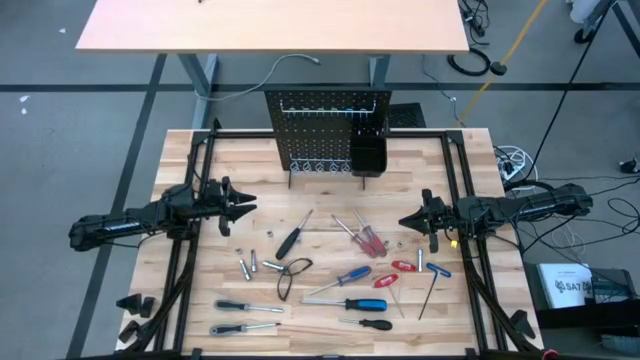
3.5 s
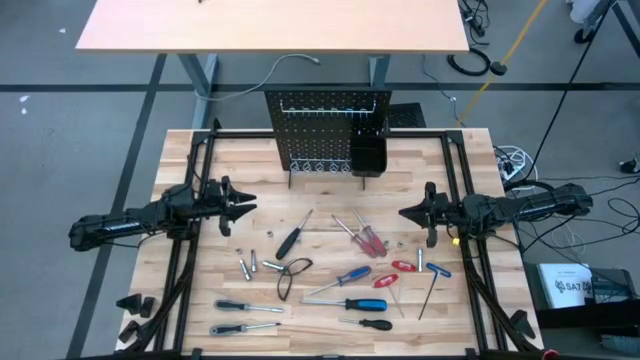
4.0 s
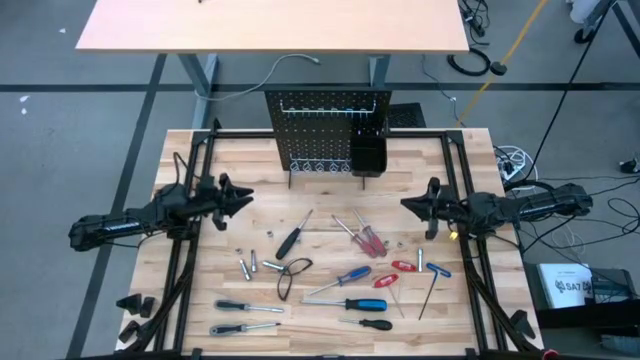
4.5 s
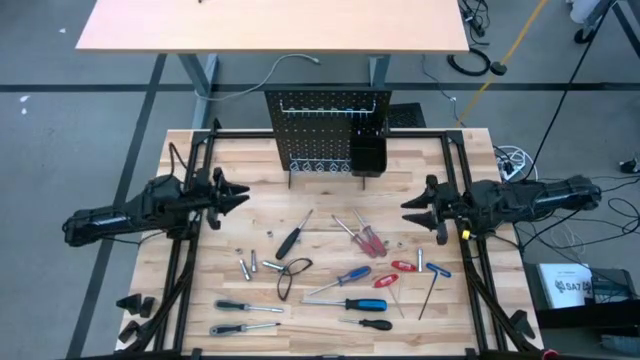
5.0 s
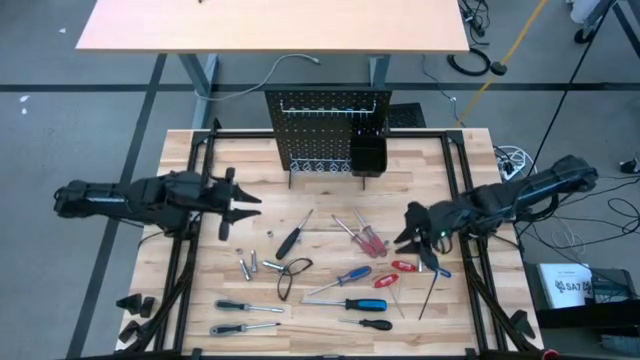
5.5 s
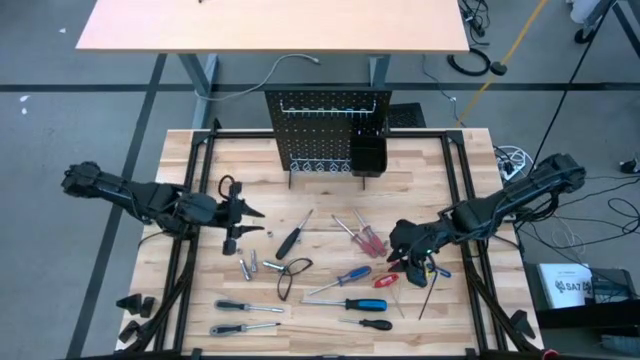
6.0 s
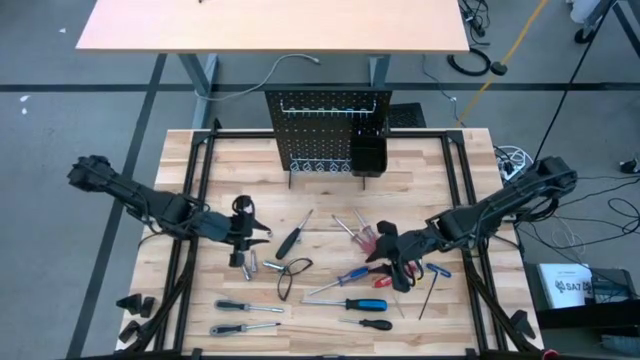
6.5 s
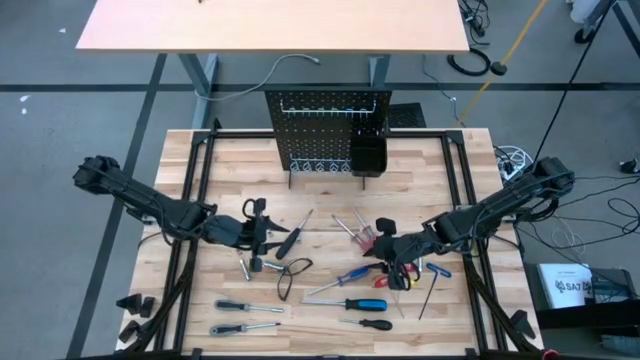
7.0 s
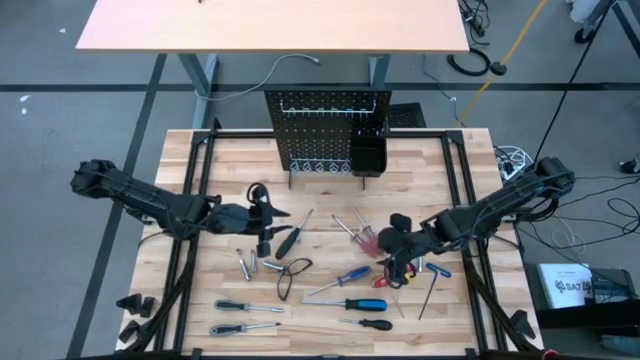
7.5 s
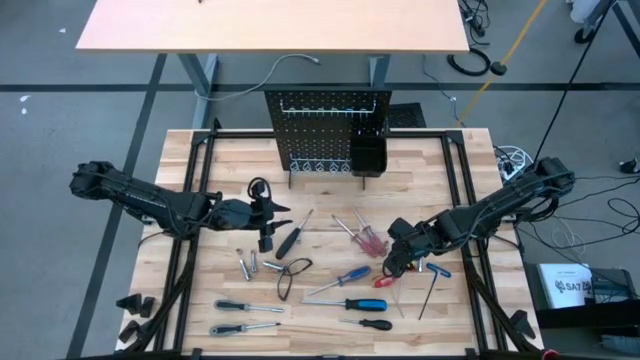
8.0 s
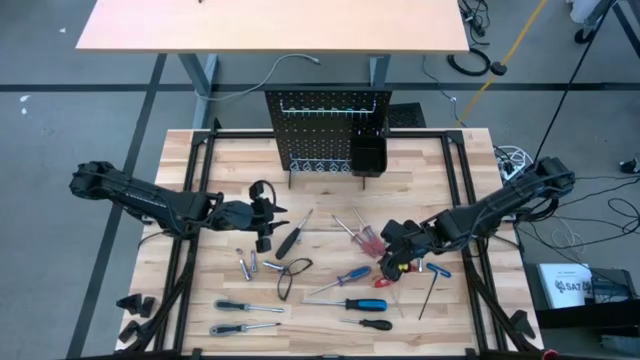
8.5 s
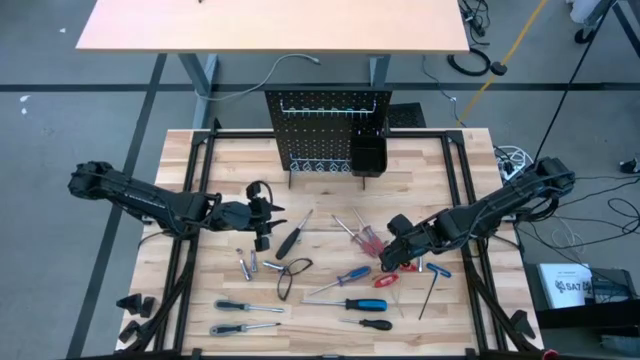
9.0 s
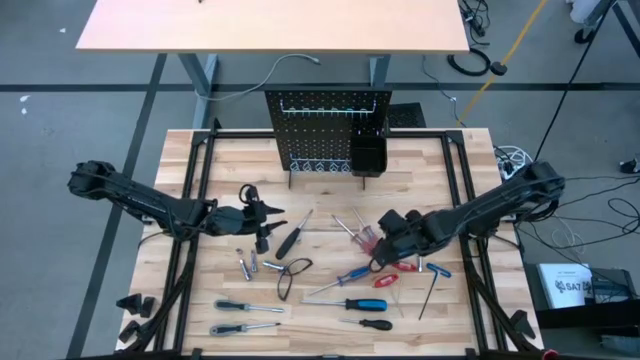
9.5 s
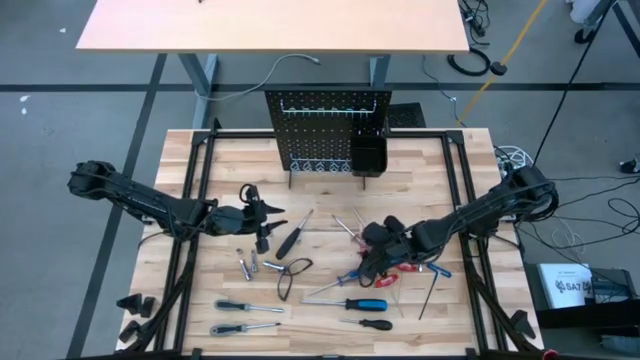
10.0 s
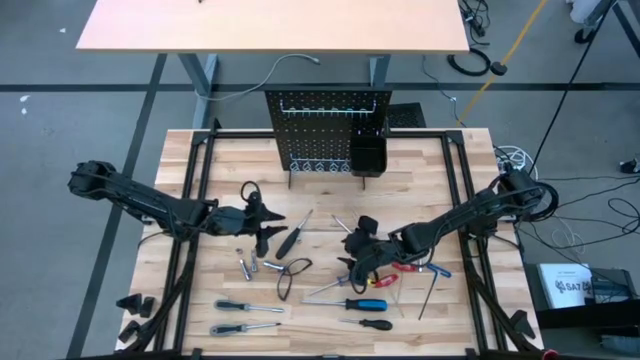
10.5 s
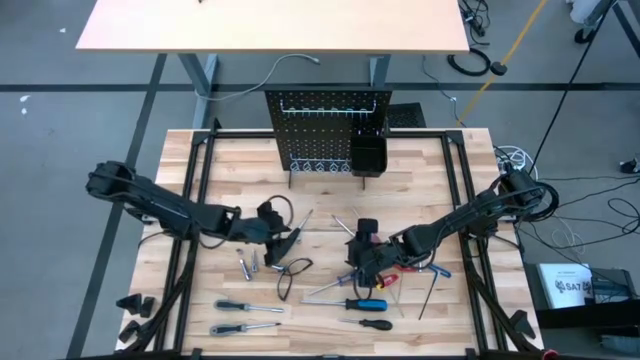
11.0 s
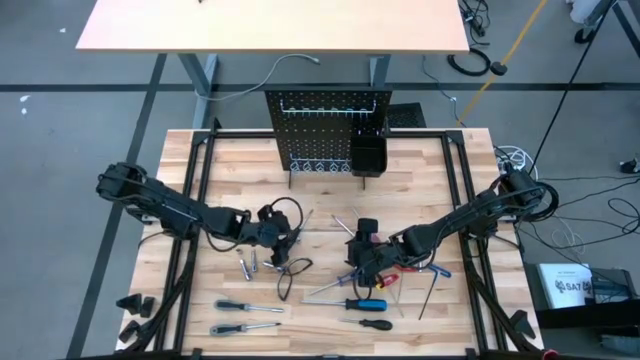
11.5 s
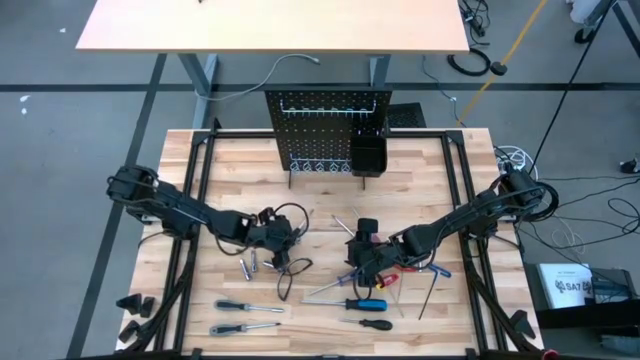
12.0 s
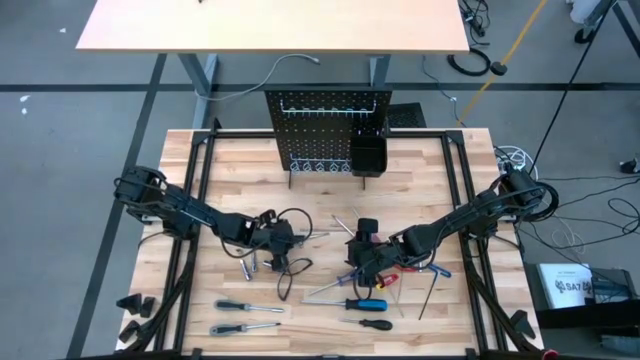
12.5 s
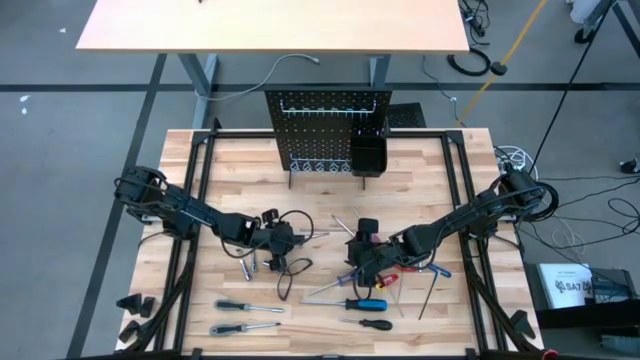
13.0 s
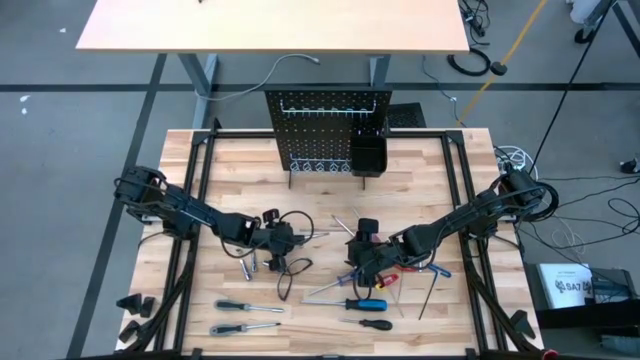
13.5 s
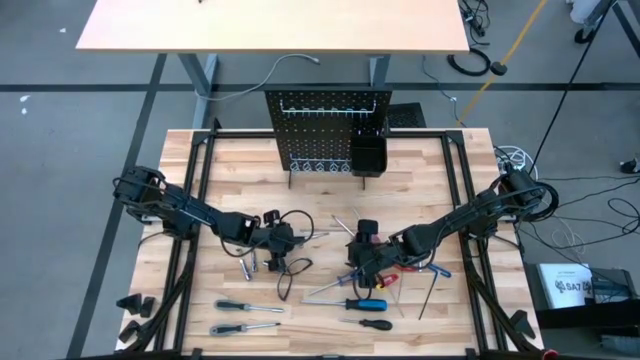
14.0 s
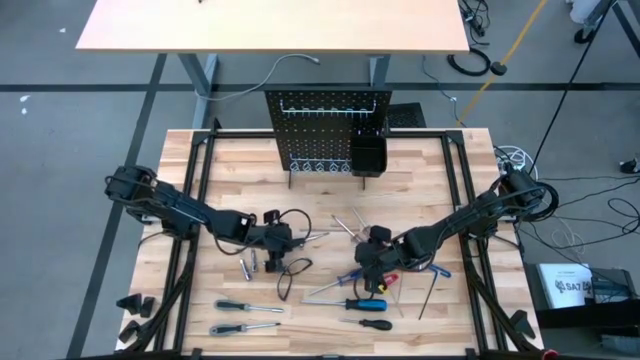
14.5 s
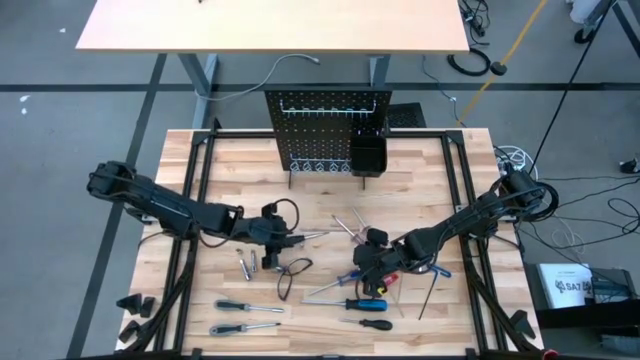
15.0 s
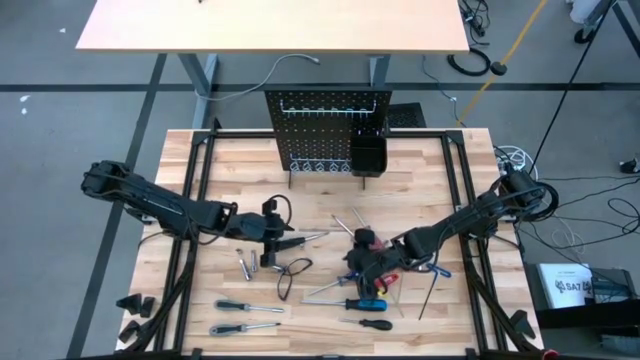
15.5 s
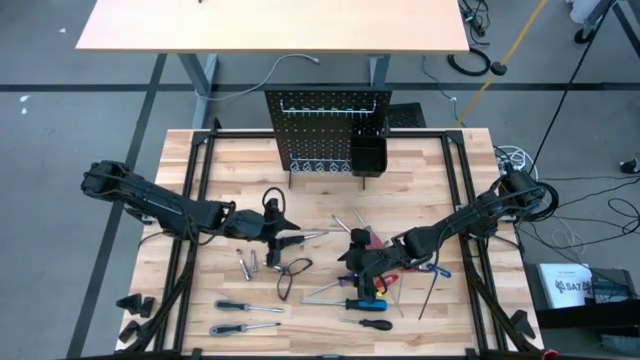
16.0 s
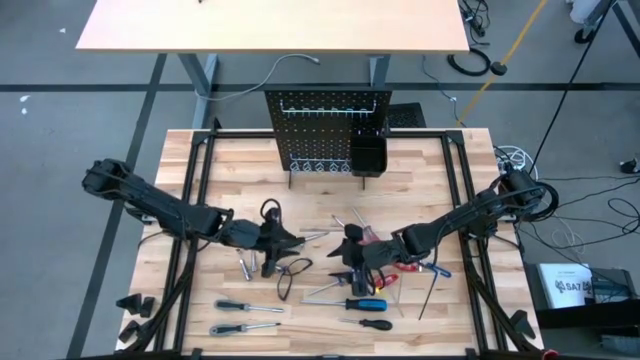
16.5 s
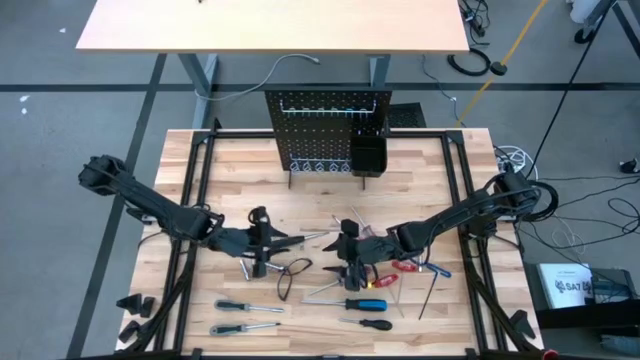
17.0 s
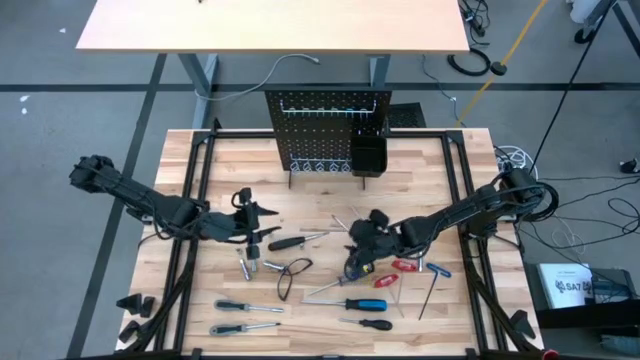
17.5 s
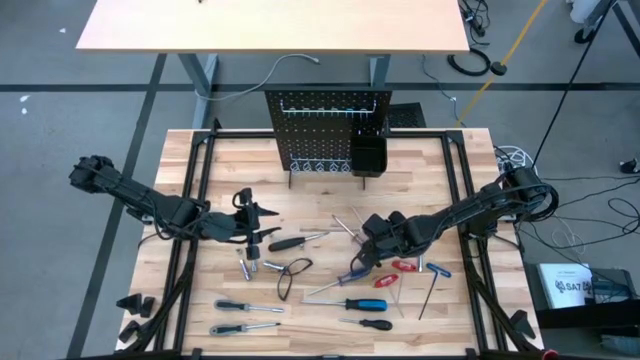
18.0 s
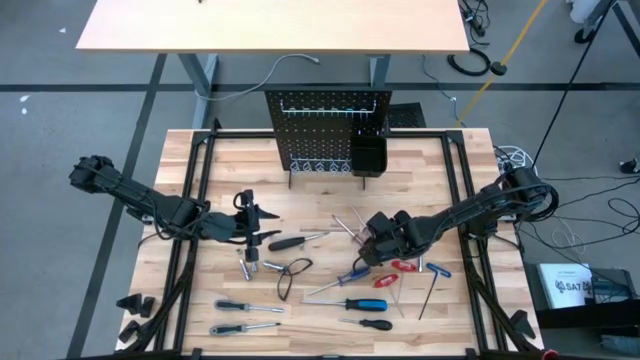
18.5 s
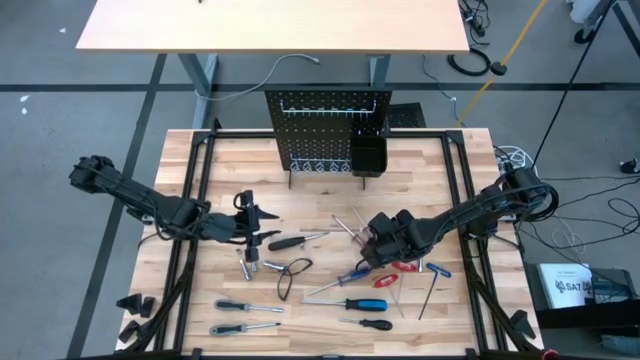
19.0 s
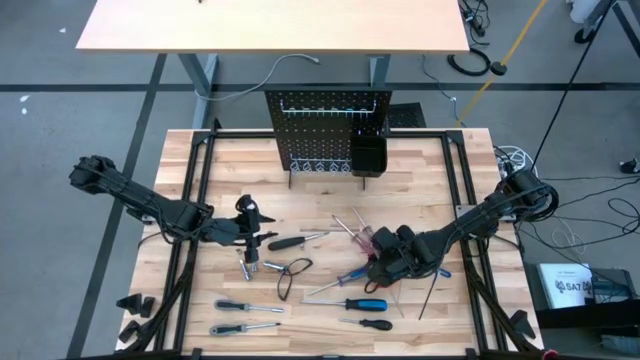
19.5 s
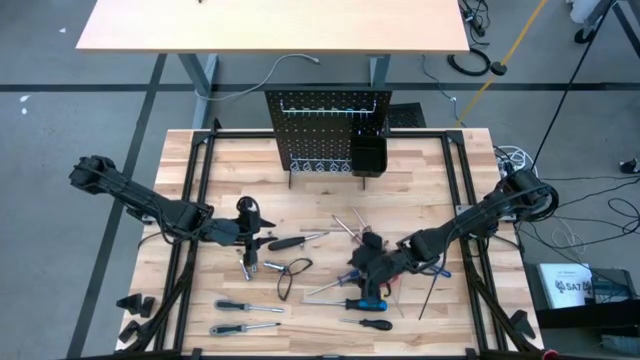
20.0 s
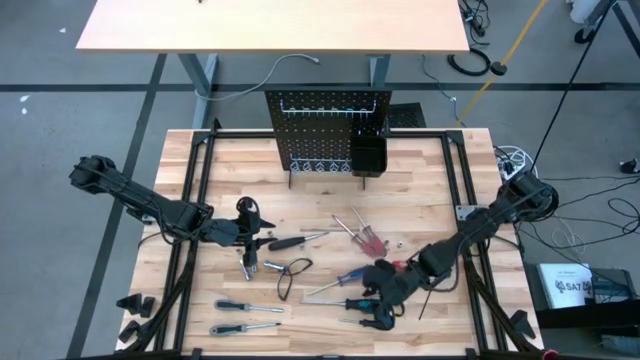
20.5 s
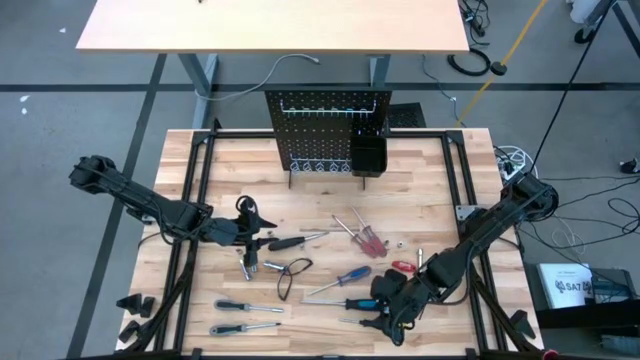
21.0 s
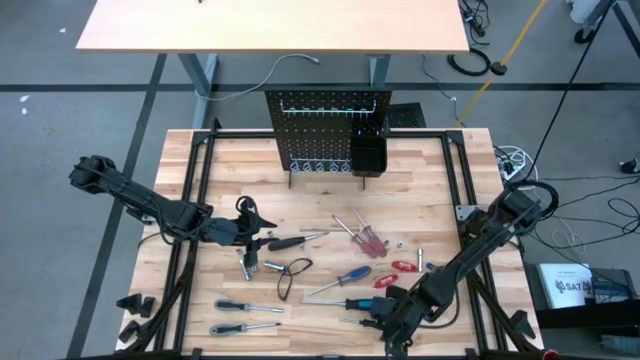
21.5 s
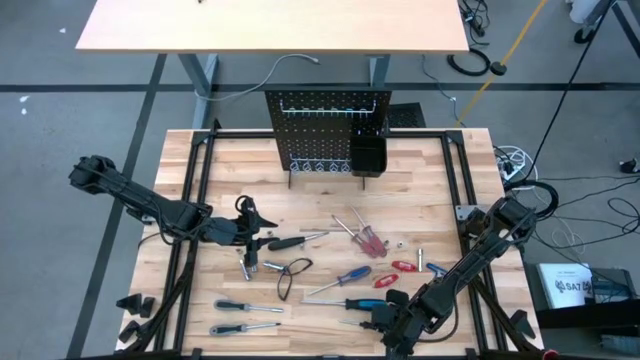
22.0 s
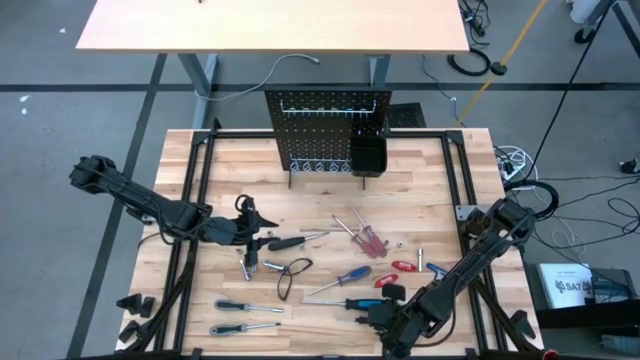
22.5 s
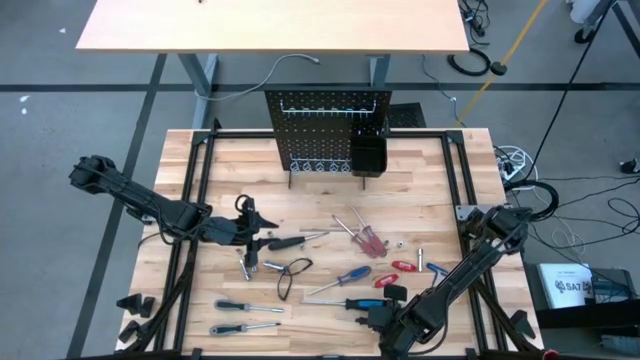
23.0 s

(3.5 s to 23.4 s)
Task: Hang tools onto peg board
Hang the bottom right black screwdriver on the peg board
